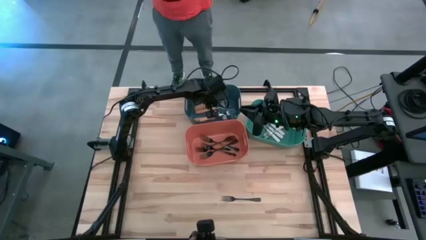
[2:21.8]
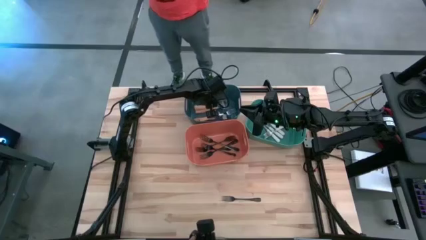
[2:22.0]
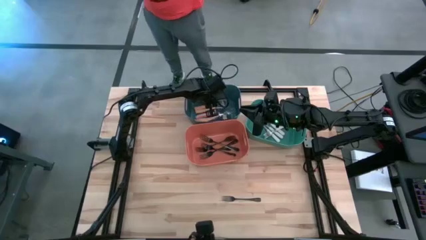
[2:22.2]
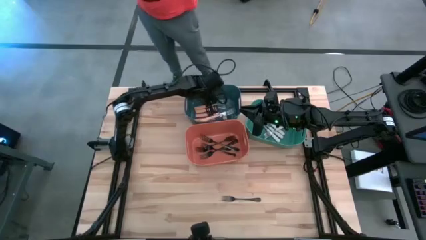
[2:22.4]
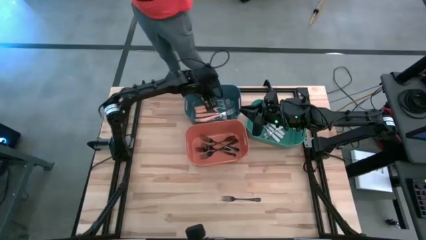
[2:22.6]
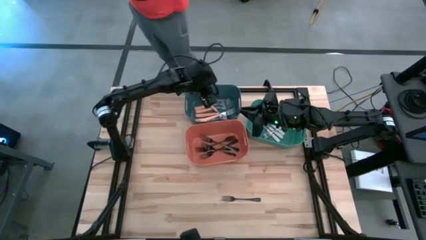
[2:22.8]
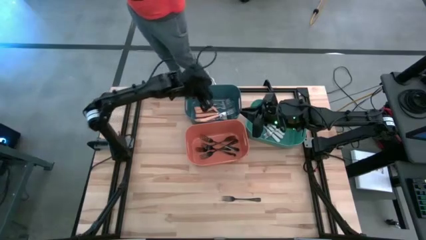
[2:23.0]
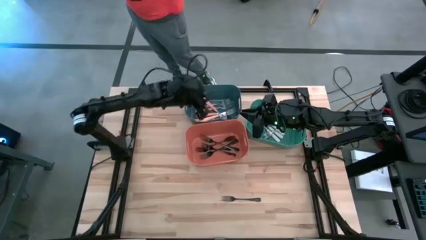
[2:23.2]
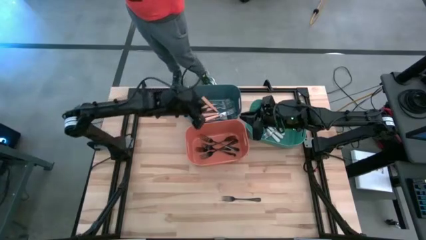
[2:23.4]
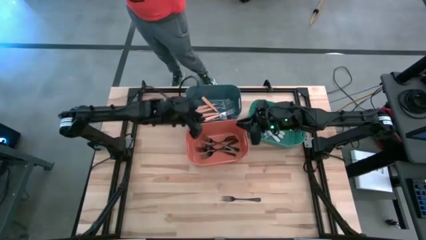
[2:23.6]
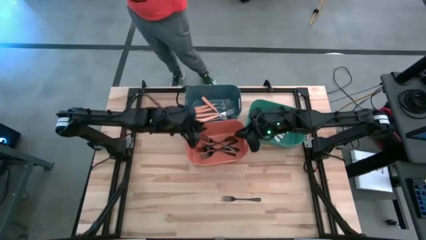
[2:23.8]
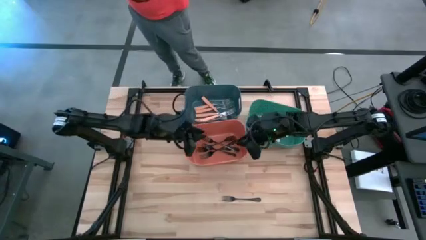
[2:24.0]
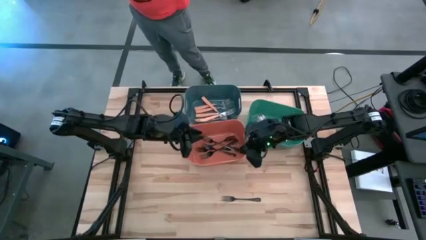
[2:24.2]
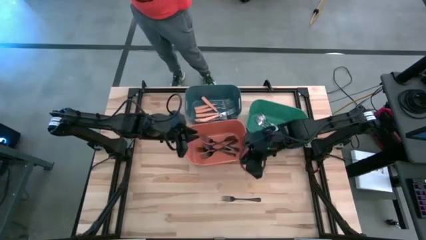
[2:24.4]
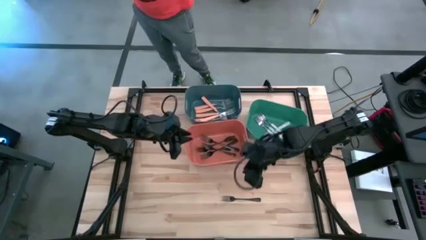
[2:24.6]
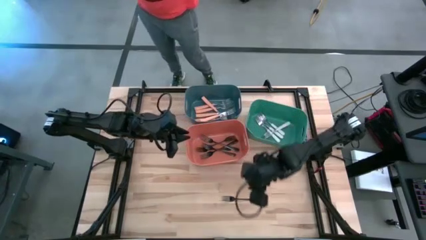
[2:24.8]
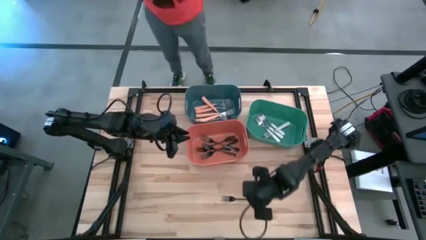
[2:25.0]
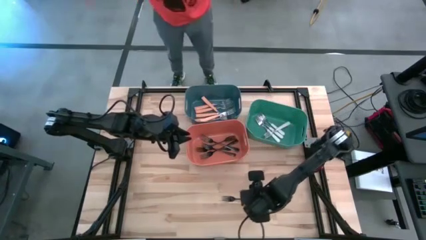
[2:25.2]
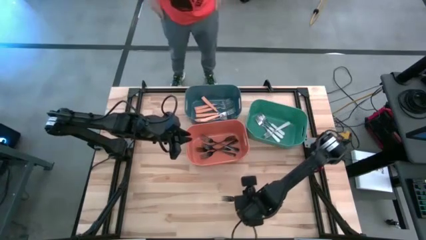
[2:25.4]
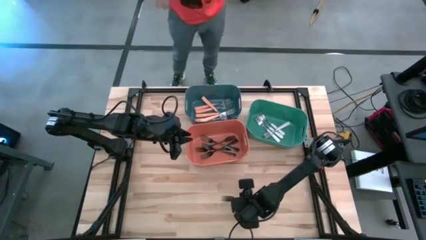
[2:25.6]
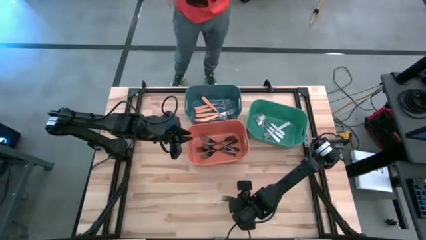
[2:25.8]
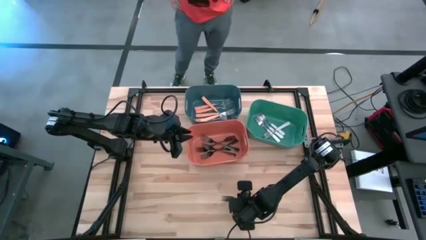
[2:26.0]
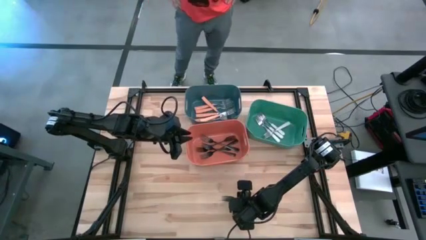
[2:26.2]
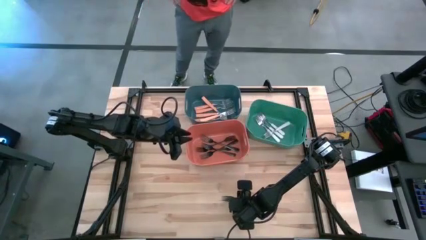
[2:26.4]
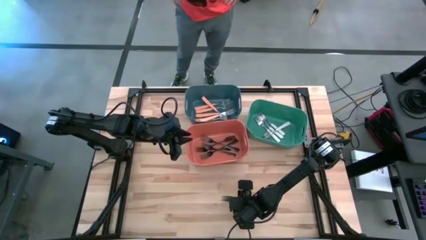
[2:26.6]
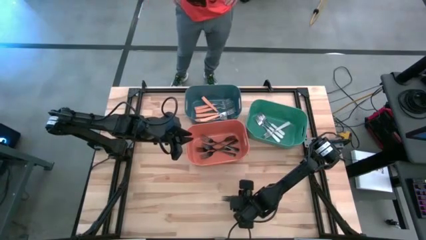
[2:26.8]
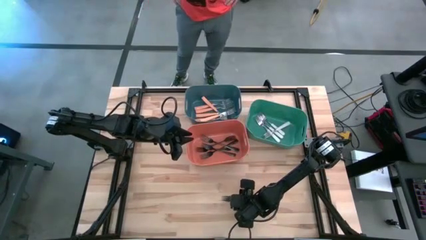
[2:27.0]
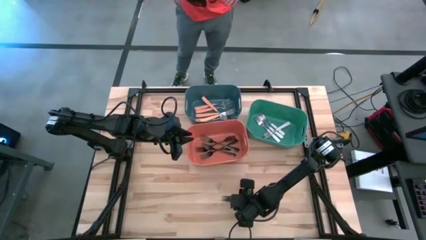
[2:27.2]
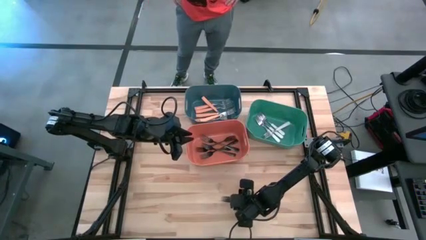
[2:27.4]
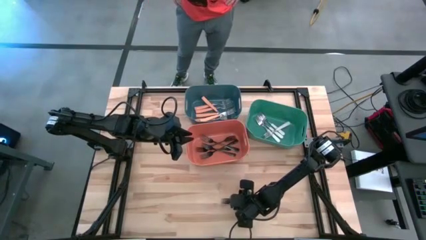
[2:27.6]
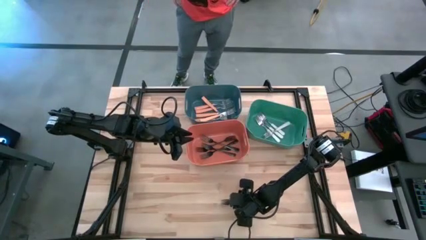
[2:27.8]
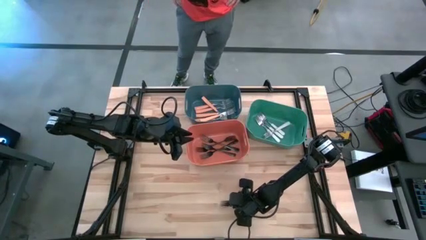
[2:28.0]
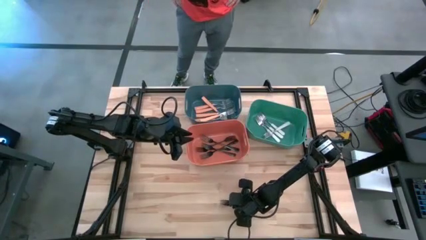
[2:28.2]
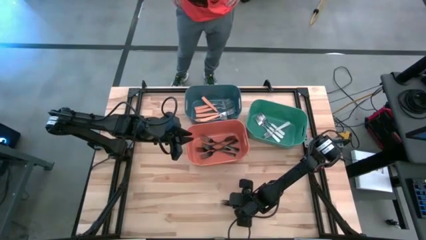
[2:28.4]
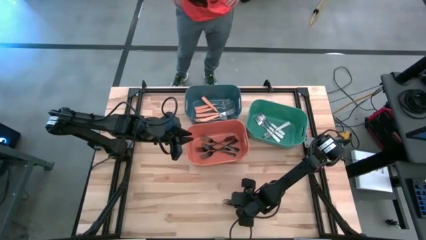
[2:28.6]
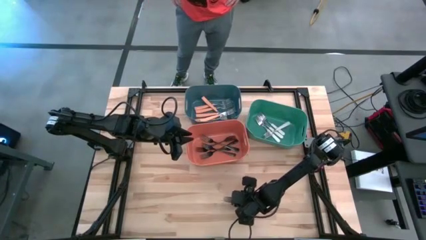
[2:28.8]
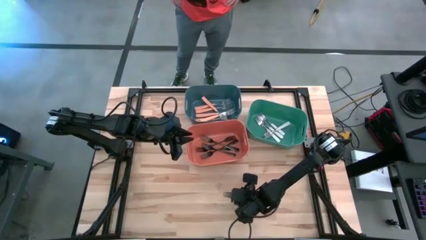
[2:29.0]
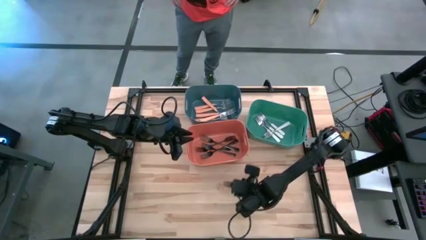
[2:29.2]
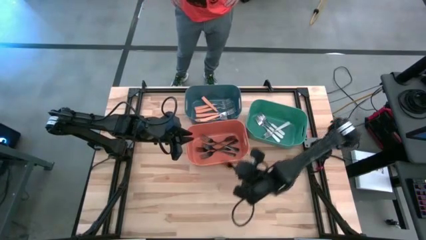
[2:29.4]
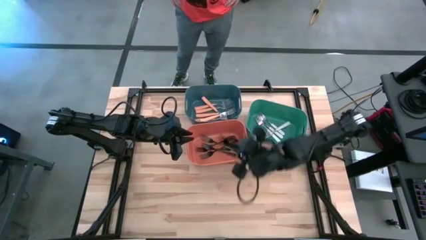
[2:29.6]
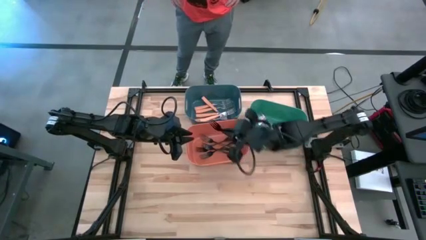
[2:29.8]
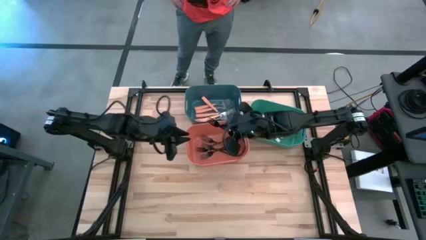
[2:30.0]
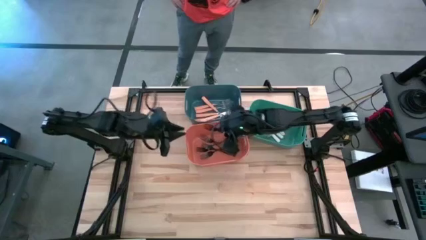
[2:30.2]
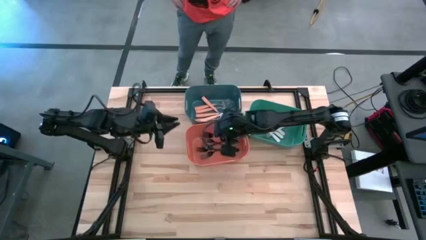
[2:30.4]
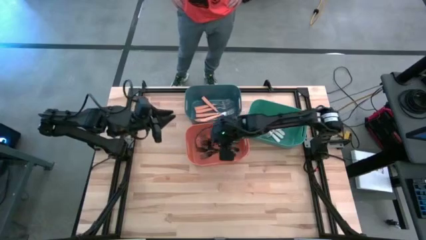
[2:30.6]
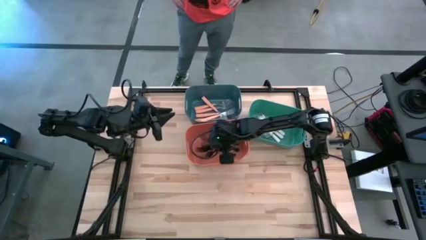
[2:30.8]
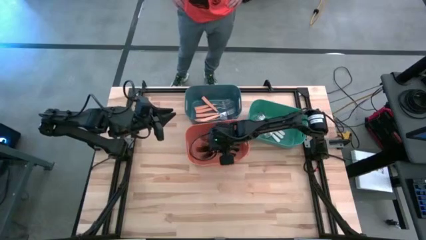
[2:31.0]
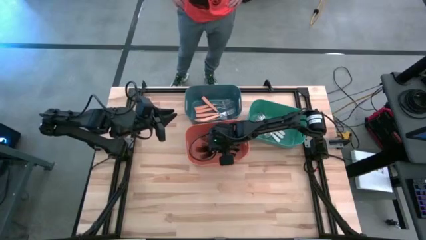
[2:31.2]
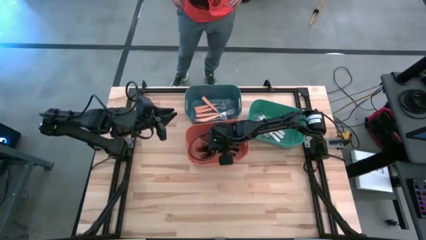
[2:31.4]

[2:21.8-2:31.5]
Task: Sort silverware by color (type)
Put the black fork into the orange bin

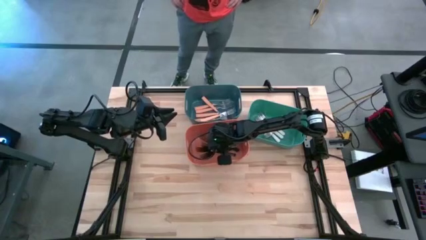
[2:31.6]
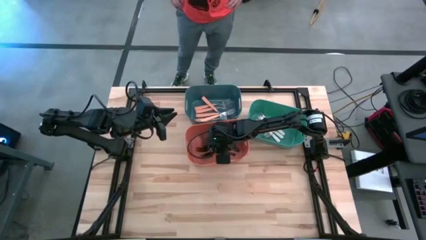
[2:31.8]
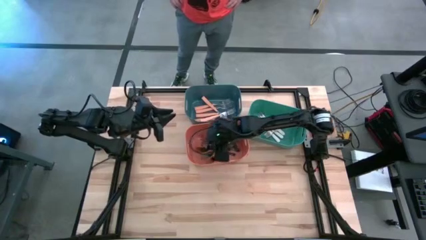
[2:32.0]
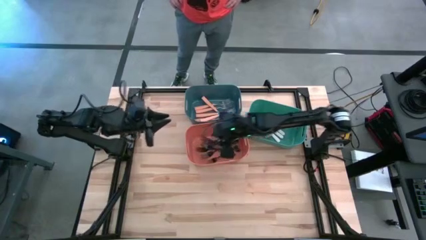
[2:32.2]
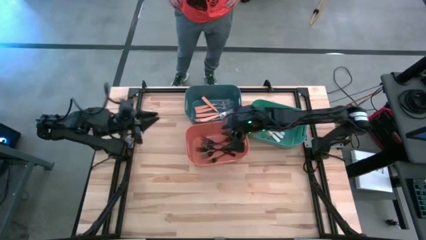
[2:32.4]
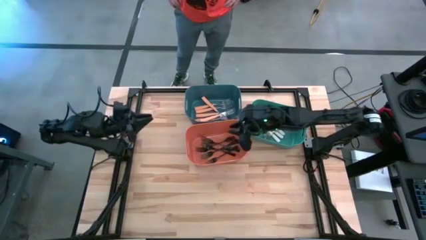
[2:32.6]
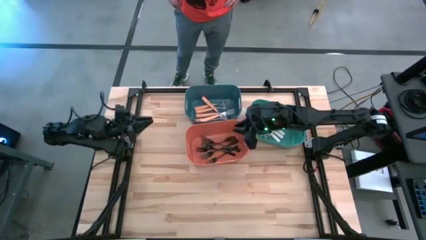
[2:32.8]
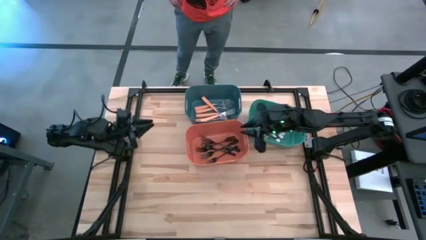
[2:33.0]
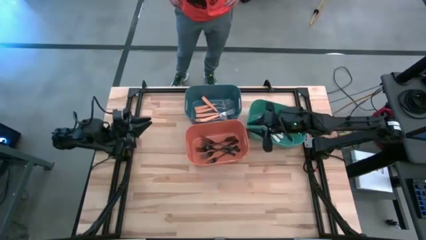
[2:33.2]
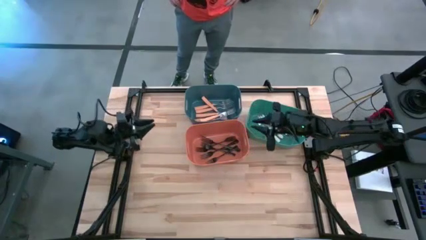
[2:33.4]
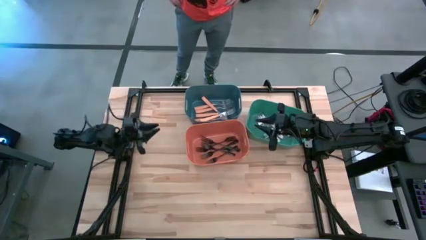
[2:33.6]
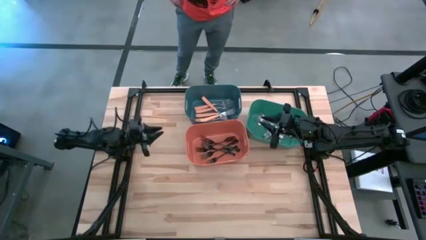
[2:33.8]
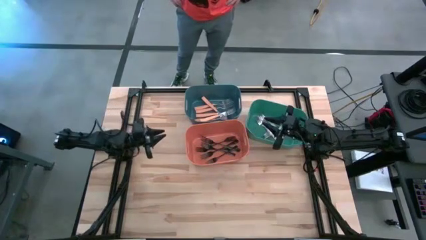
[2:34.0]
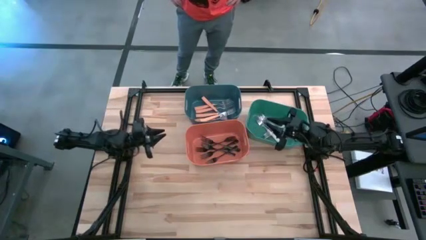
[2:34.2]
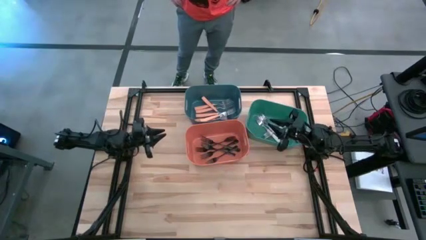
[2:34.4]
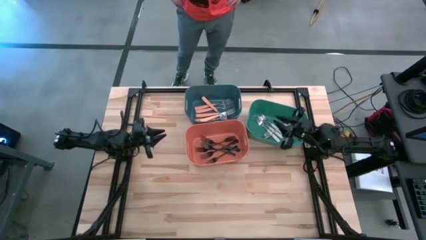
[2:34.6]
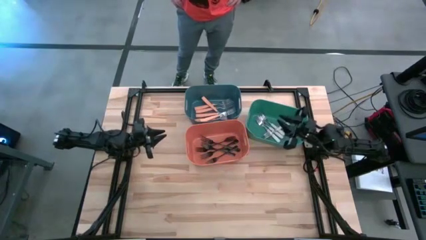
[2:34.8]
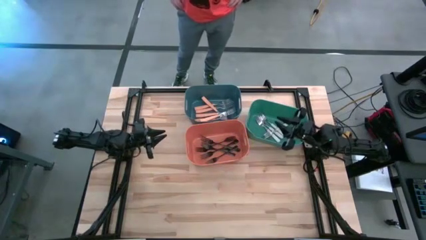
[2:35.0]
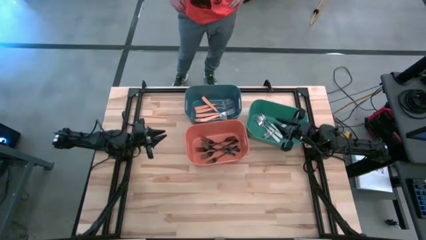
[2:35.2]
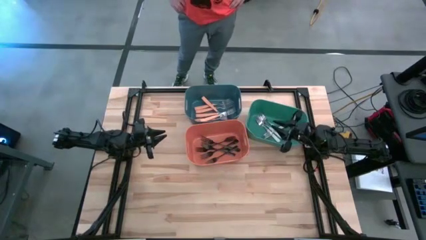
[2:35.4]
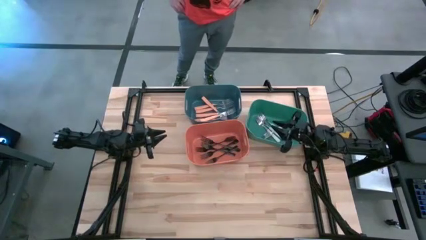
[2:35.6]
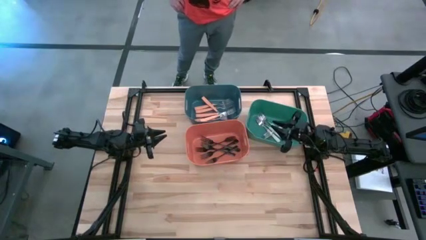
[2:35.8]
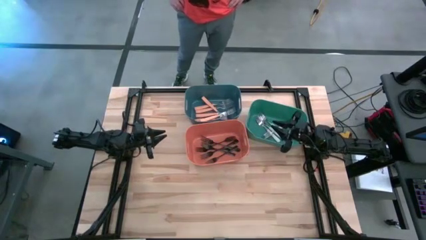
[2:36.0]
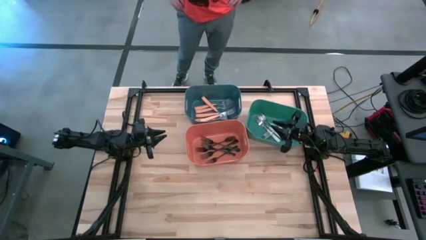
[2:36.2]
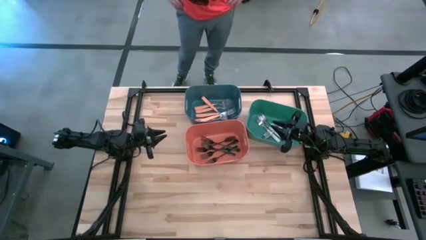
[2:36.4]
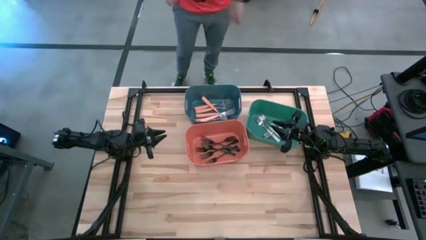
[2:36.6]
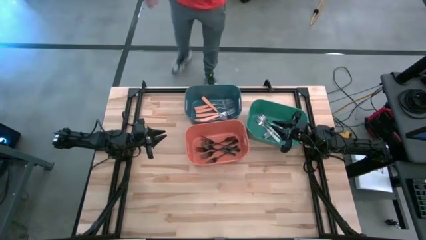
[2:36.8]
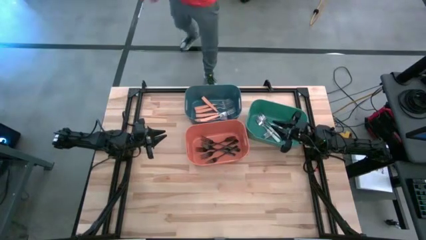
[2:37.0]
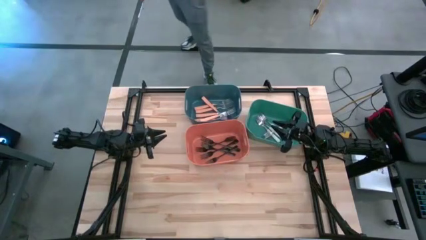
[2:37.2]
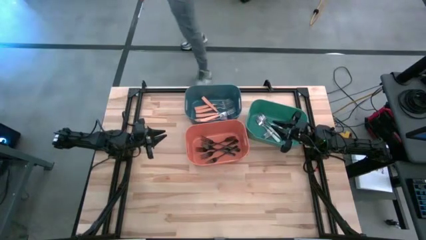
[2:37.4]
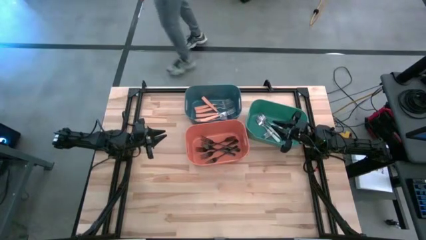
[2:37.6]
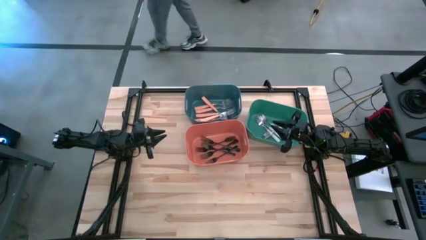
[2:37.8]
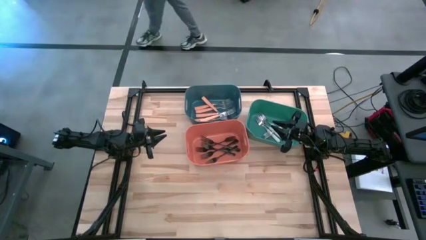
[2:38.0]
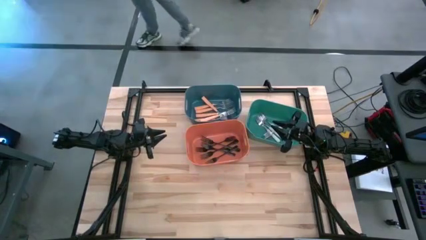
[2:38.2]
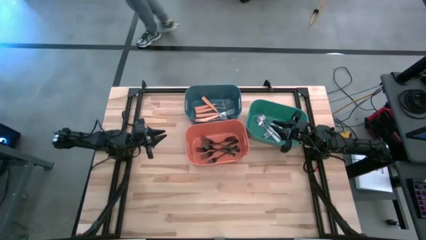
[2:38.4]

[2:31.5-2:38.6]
Return to Home Position
